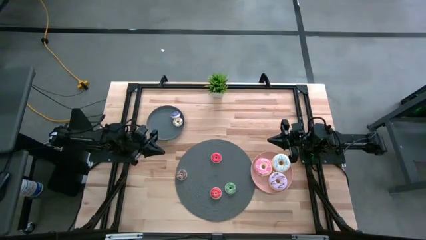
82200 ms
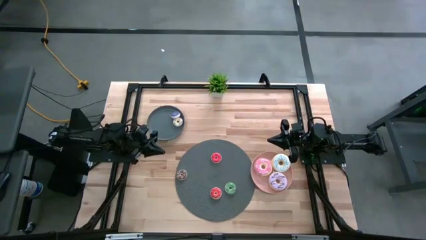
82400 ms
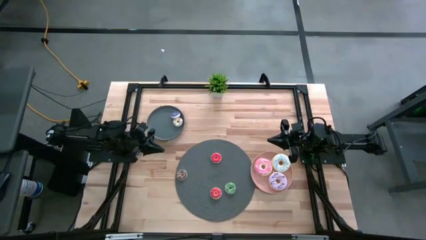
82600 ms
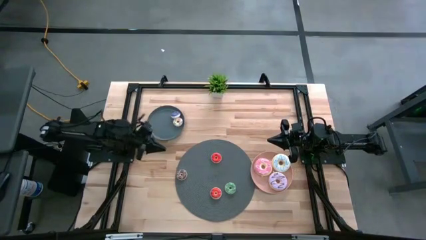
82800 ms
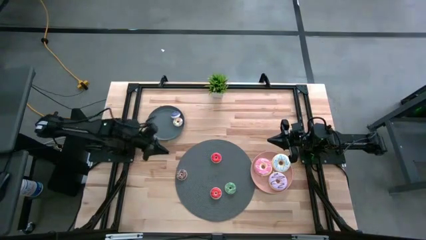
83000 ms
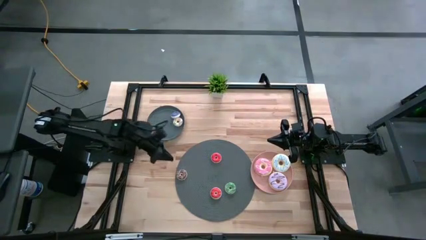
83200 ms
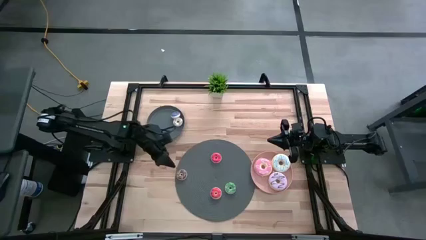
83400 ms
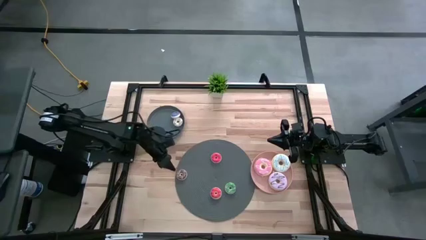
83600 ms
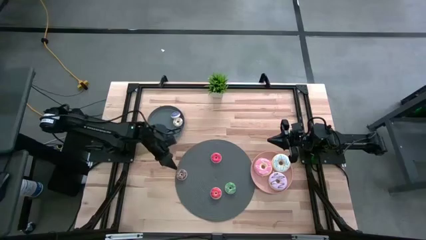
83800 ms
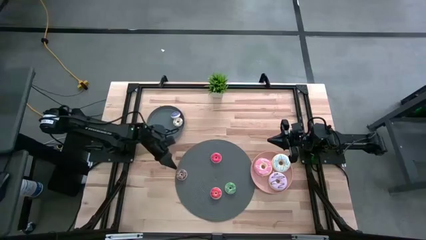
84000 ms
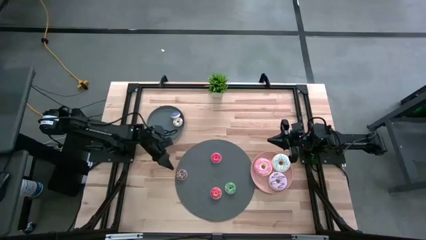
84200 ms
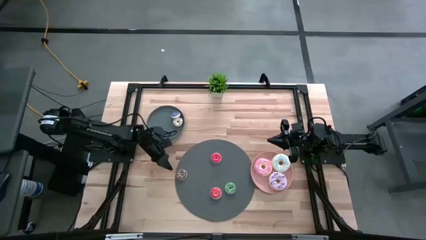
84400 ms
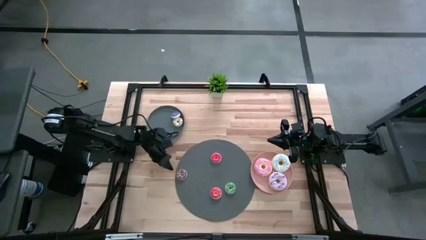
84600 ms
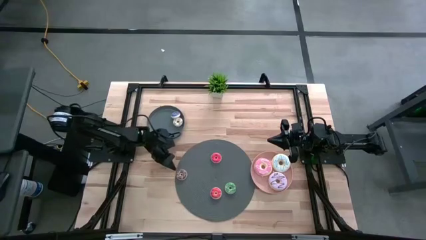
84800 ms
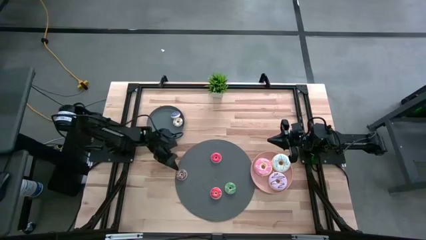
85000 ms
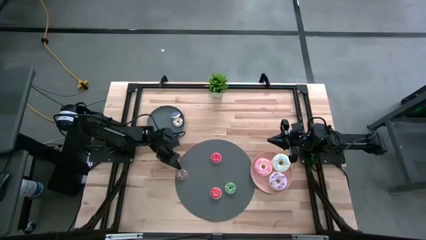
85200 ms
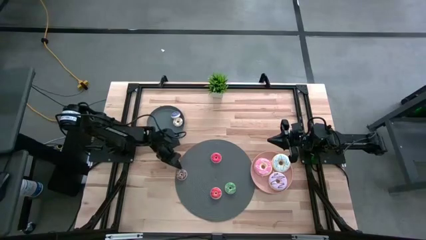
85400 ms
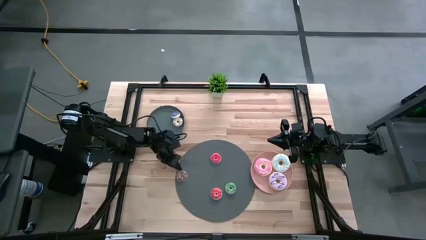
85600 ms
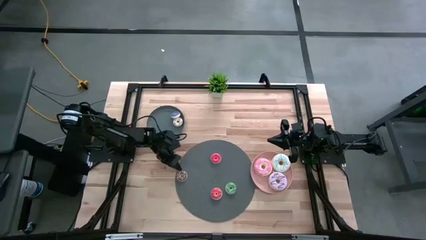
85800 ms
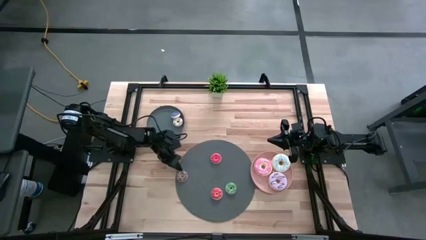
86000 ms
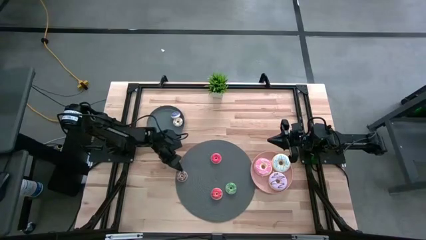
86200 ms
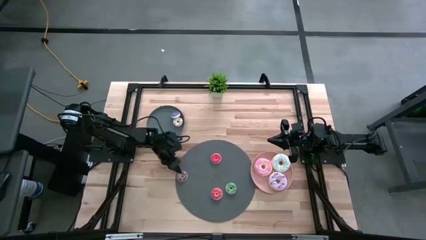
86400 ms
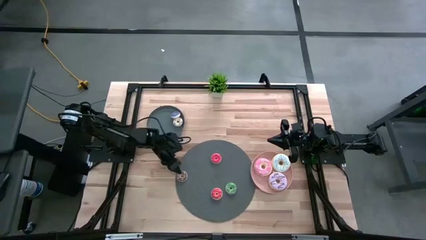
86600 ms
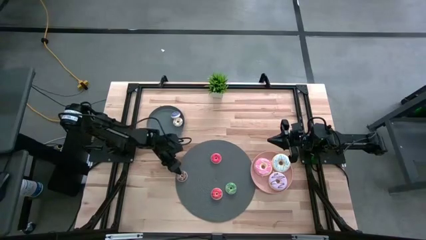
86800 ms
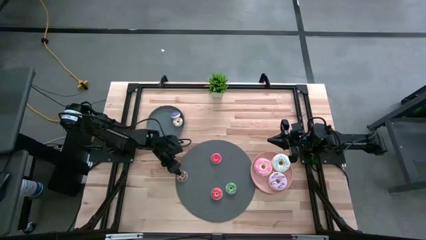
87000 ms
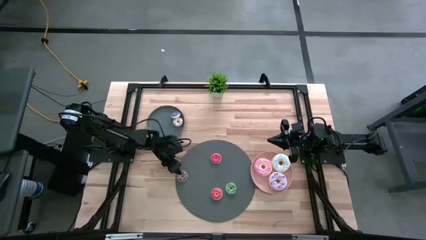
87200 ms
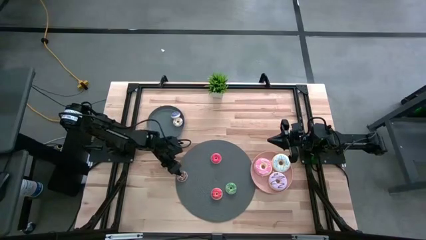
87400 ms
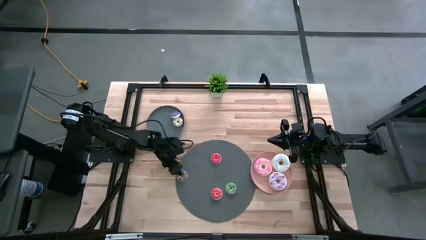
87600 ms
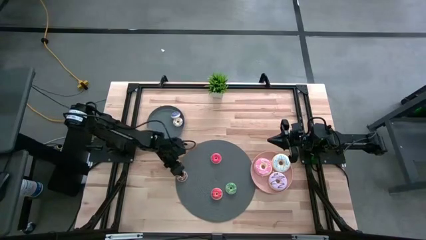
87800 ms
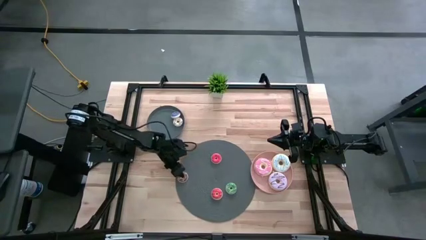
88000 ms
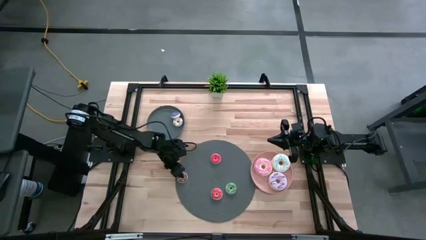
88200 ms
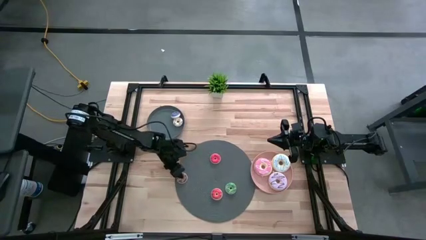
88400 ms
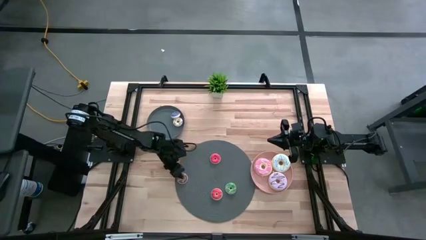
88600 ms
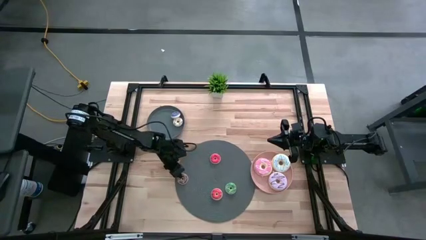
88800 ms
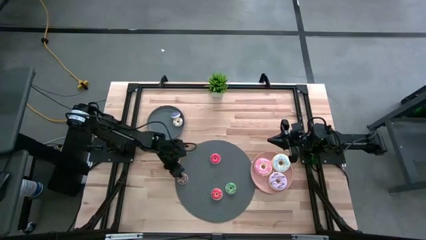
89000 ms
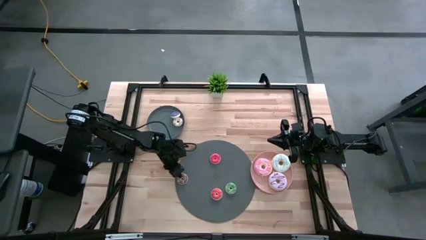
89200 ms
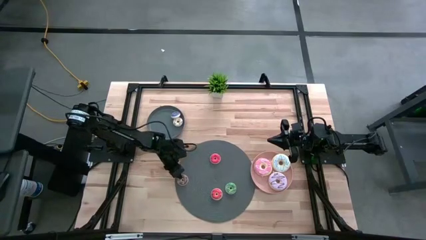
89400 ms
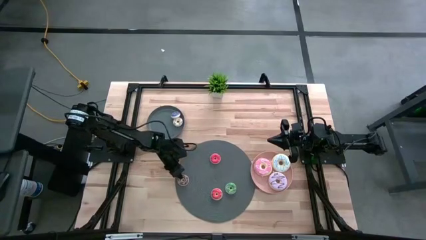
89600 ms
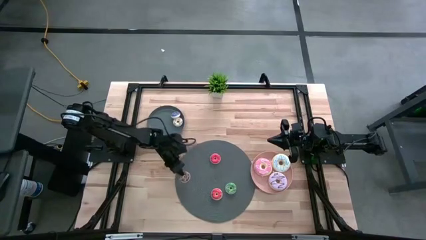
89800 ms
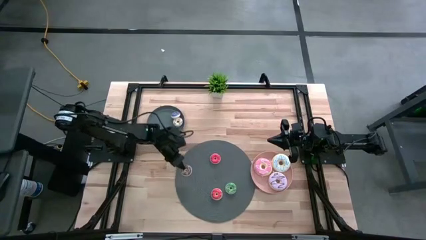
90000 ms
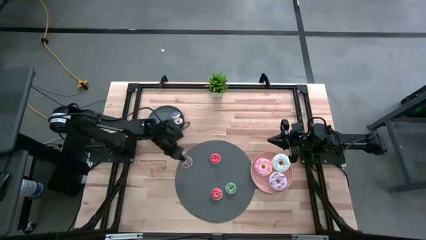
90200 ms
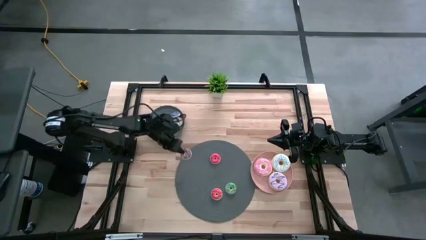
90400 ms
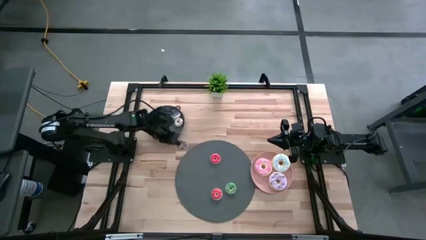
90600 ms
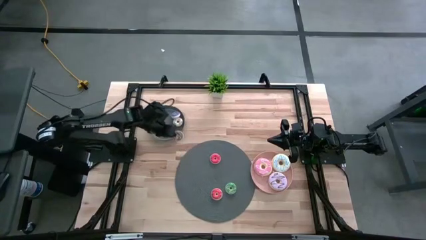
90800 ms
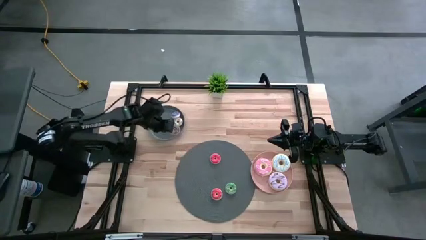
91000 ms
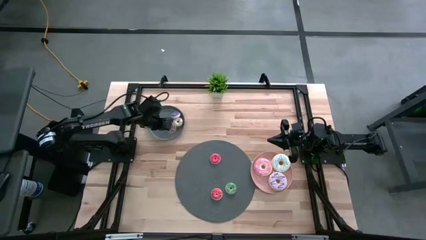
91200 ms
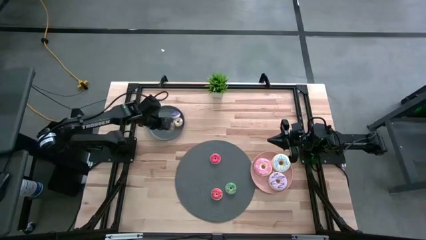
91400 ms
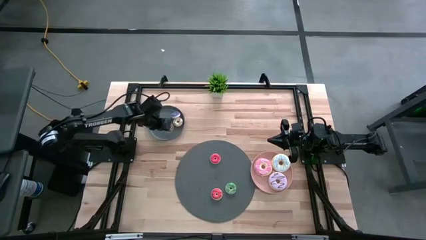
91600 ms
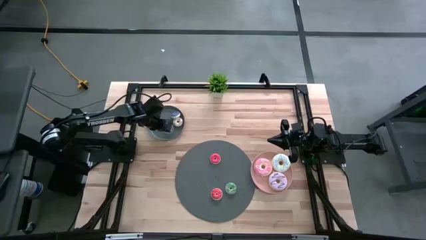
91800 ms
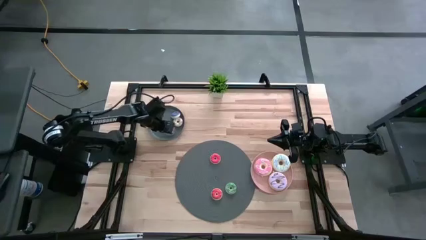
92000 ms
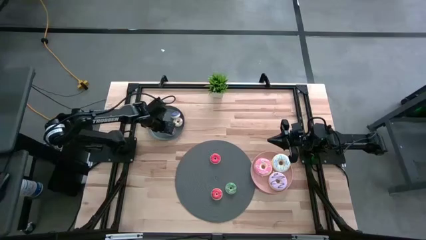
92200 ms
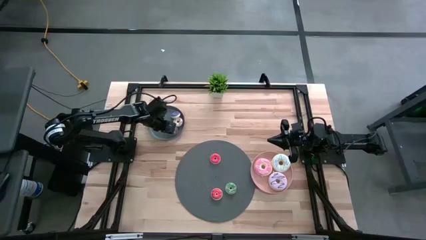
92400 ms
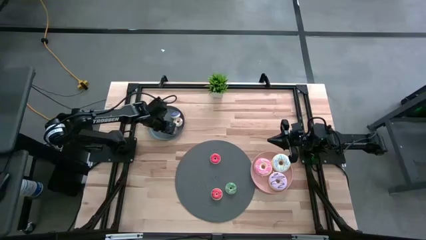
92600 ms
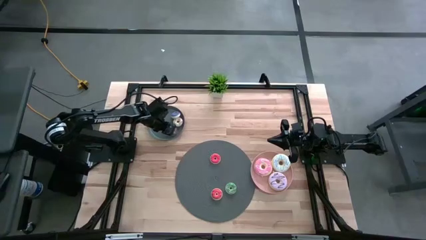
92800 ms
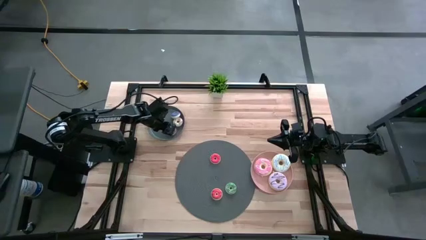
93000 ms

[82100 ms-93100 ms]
Task: Pick & Place donuts
Put the small brown donut on the gray plate

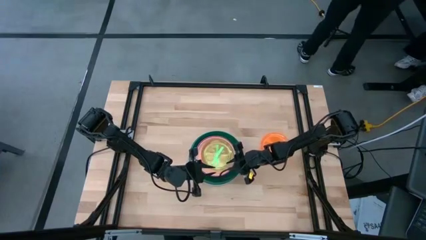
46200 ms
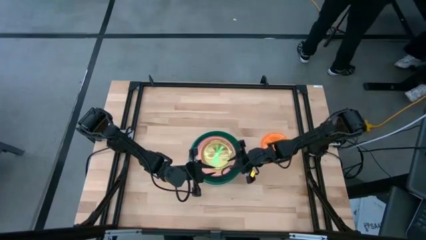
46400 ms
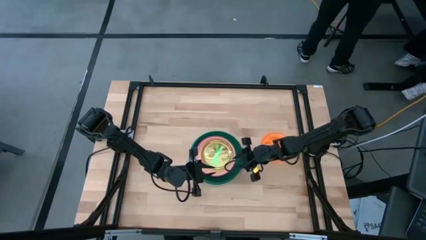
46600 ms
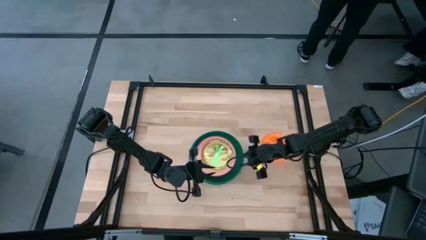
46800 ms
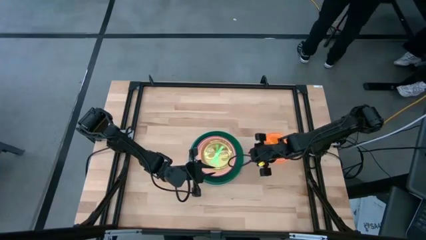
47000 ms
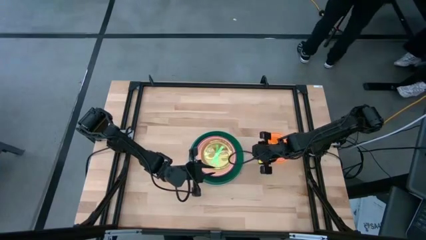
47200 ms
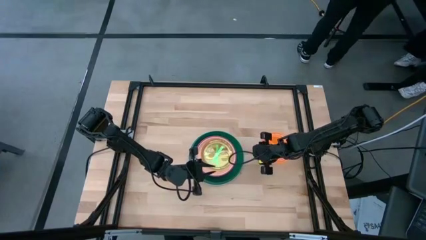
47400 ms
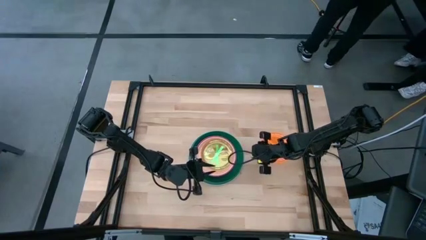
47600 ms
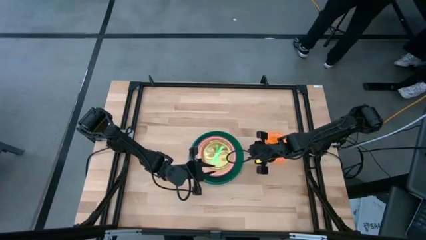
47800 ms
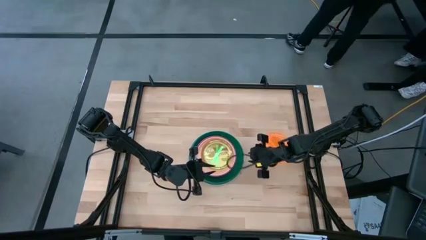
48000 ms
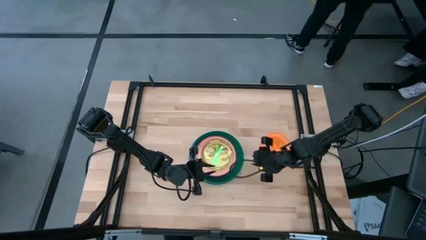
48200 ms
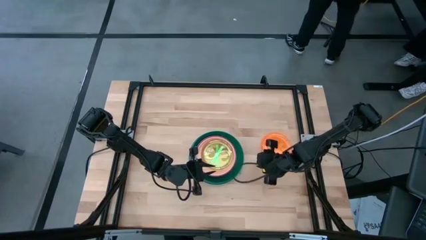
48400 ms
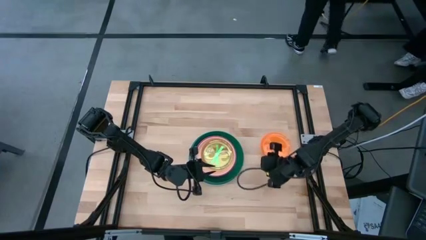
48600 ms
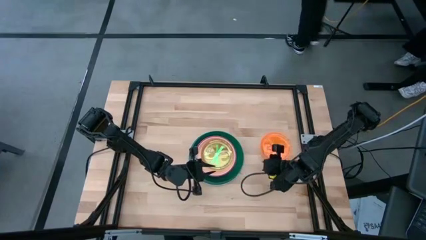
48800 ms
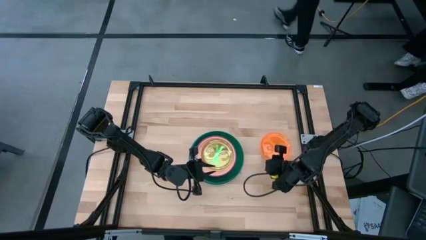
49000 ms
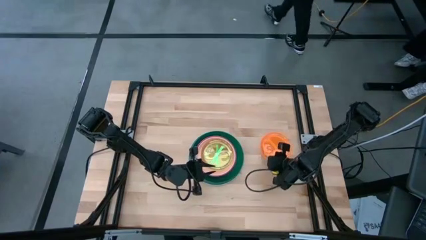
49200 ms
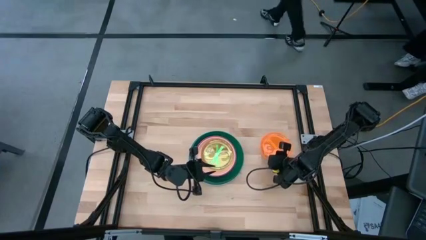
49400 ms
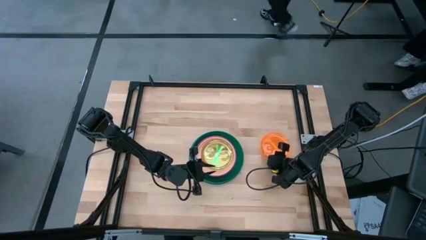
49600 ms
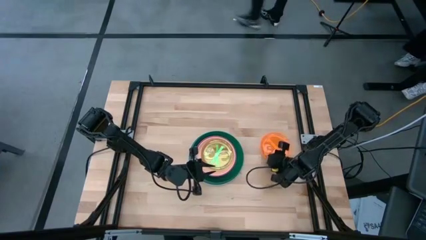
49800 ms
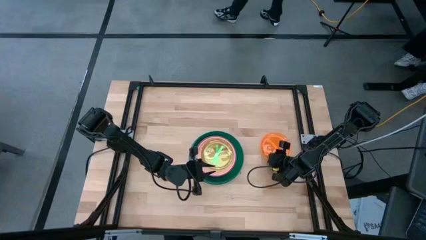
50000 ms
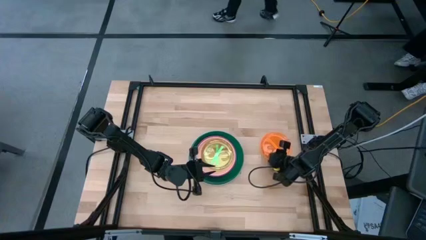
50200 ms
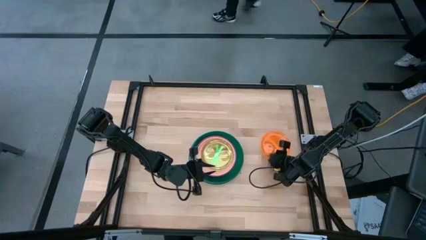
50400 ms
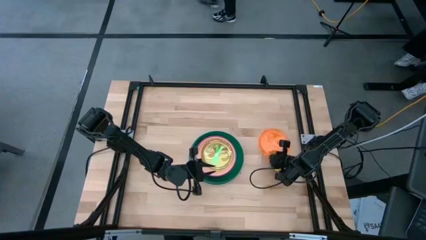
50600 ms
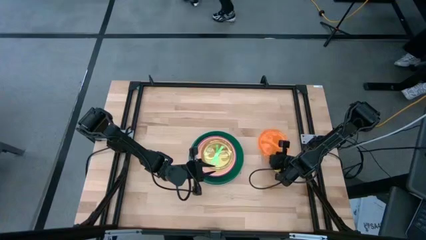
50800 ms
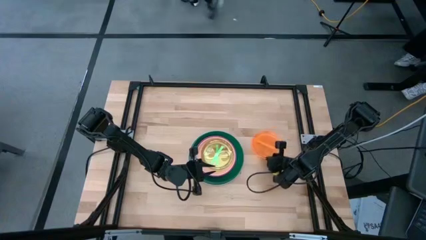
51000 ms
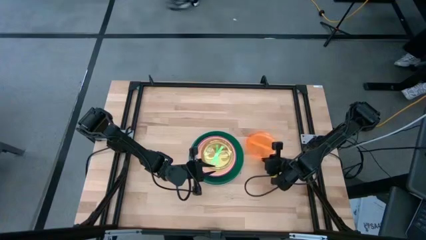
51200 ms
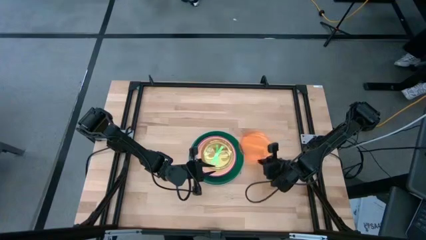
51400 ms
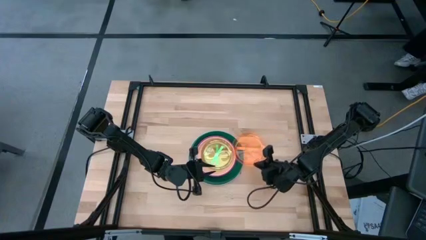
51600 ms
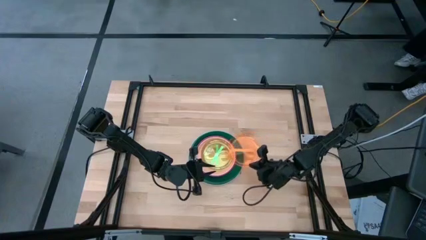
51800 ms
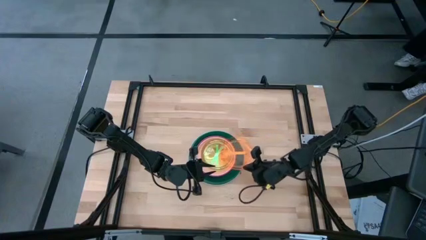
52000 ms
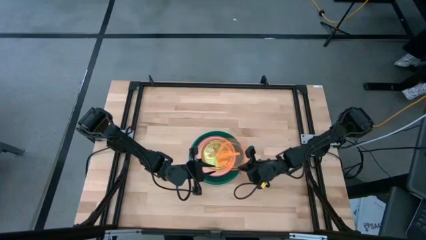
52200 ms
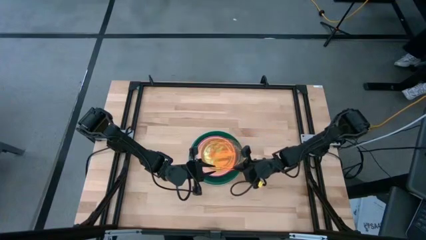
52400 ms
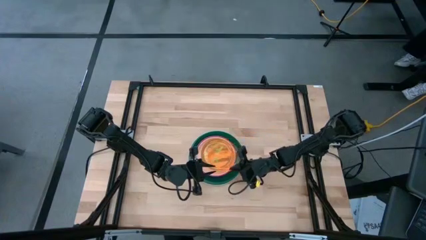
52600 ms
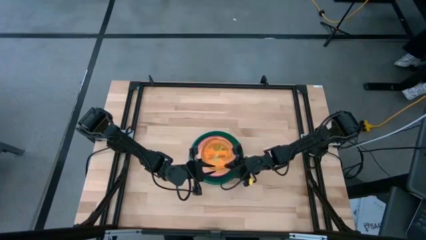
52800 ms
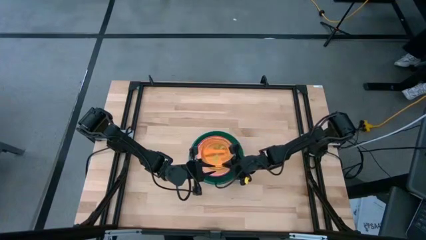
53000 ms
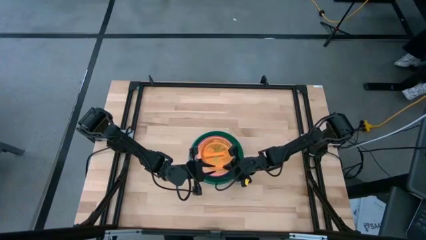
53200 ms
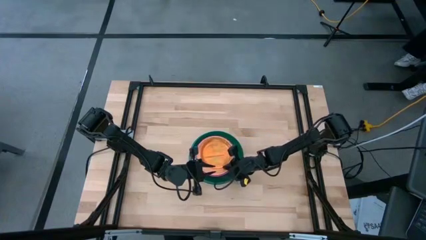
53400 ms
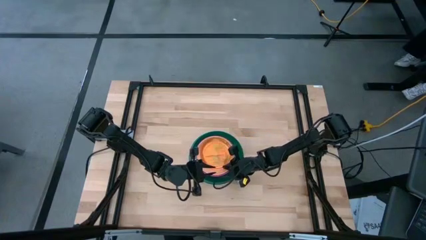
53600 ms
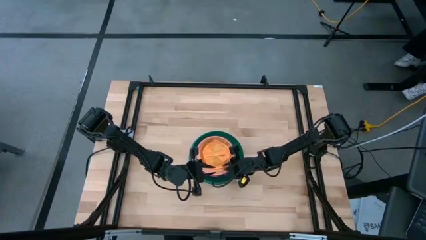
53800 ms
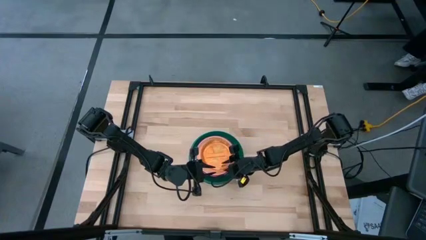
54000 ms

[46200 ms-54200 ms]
Task: Stack plastic plates
Stack the orange plate on top of the light green plate
